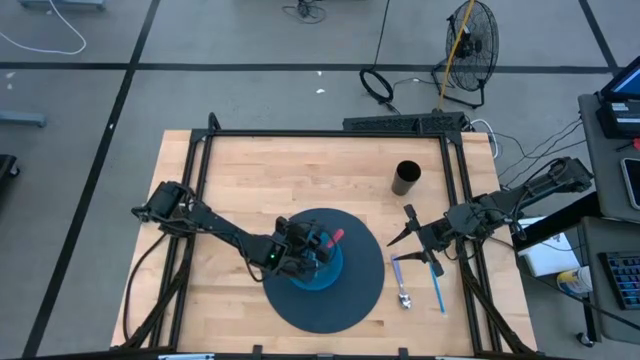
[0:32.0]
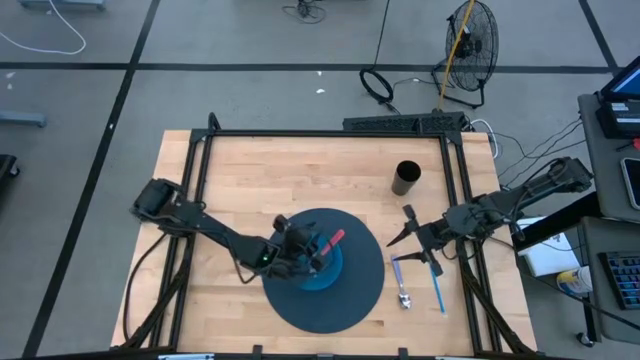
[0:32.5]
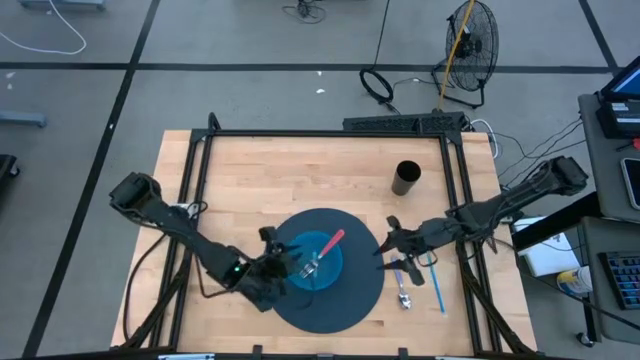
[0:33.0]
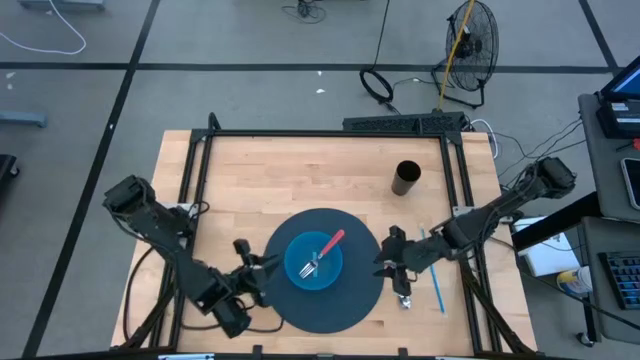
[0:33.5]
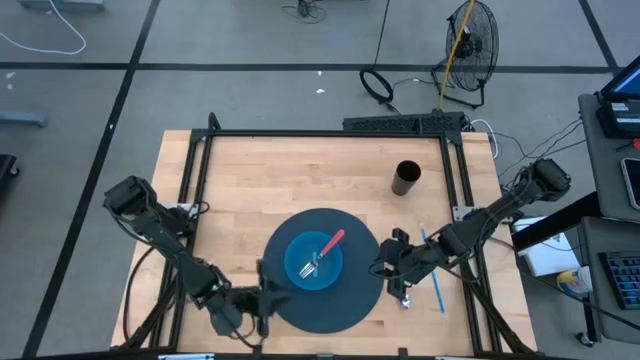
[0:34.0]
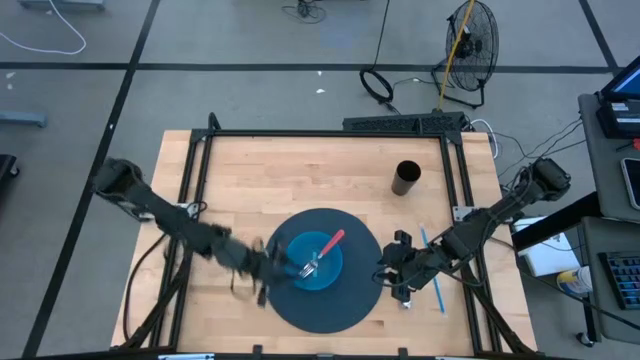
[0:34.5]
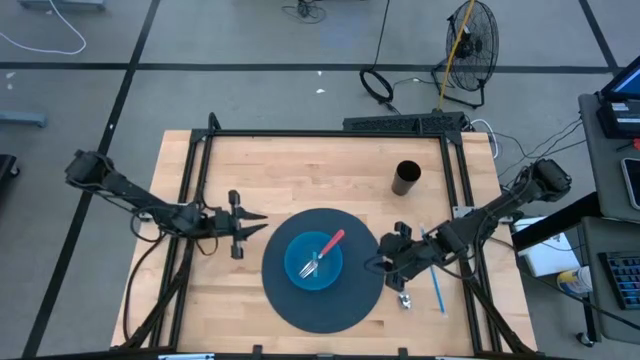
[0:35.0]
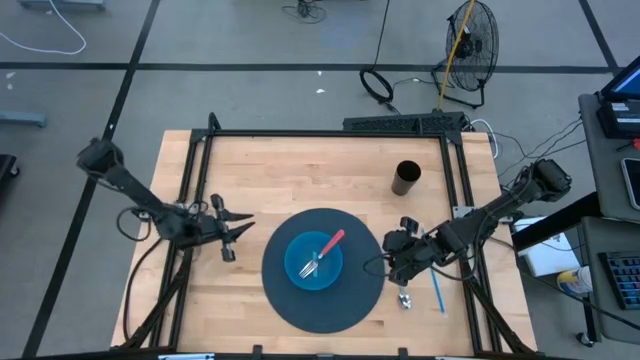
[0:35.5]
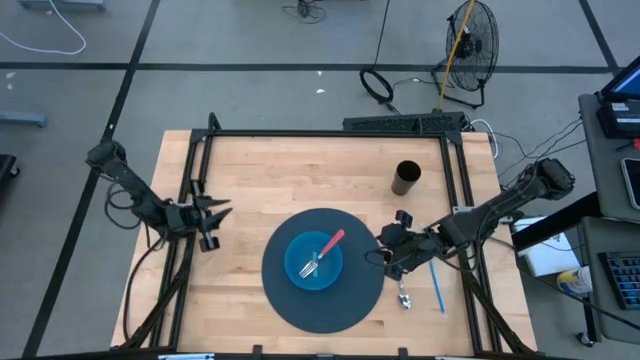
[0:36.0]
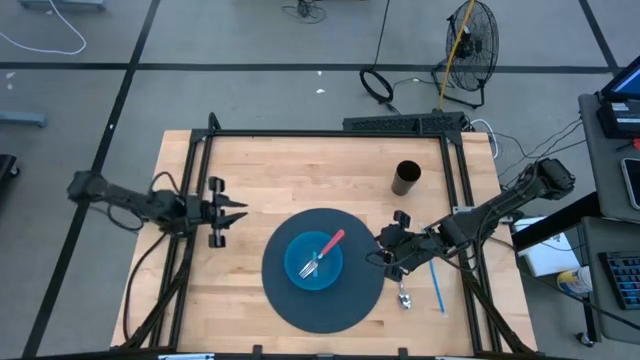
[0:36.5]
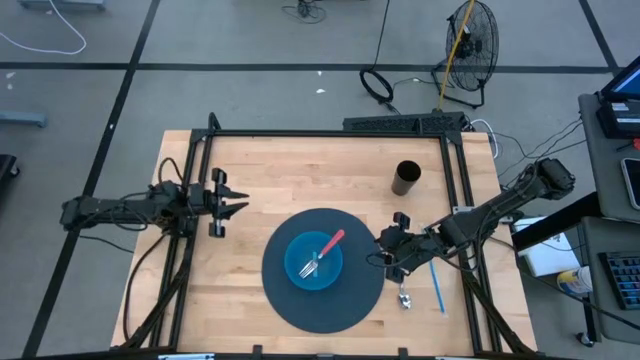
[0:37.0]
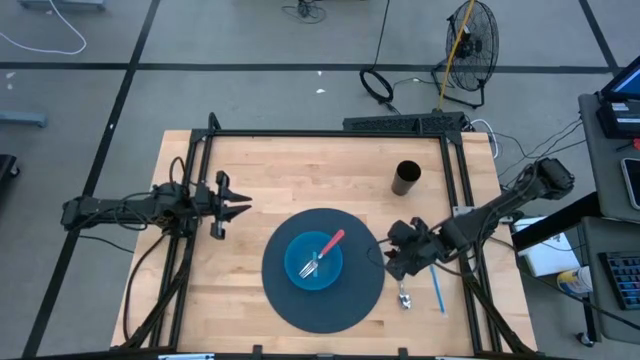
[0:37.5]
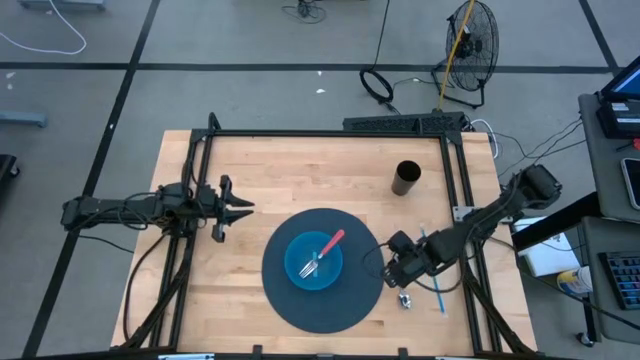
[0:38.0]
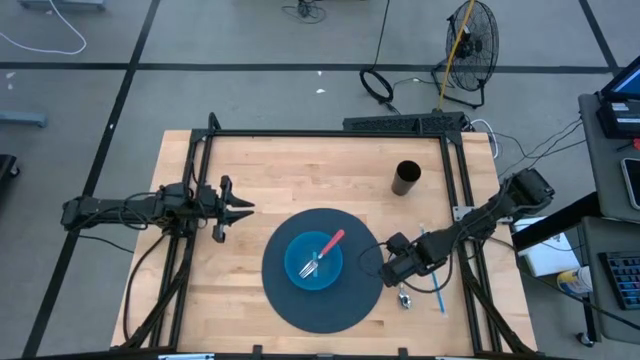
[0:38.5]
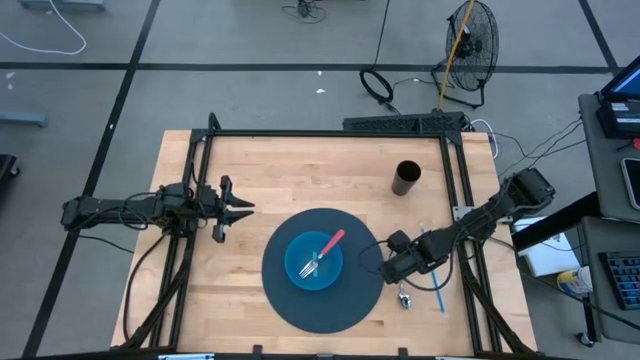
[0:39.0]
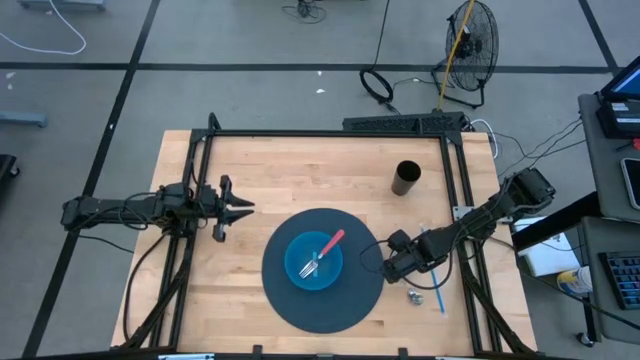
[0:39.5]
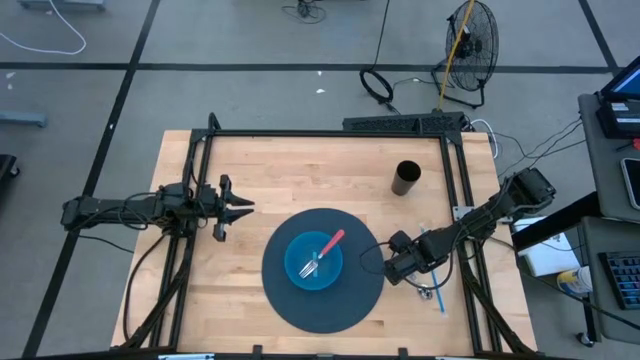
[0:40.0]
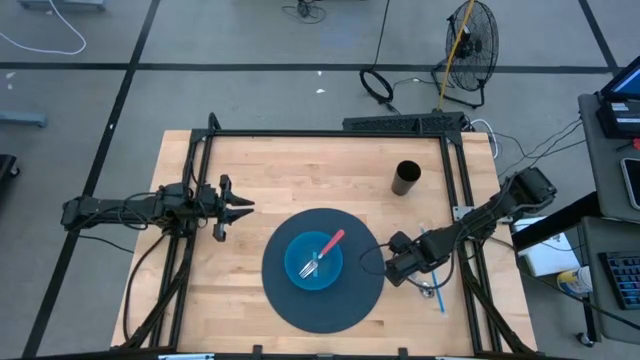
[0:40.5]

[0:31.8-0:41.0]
Task: Pick & Place Utensil
Put the purple spoon into the blue bowl on the blue mat

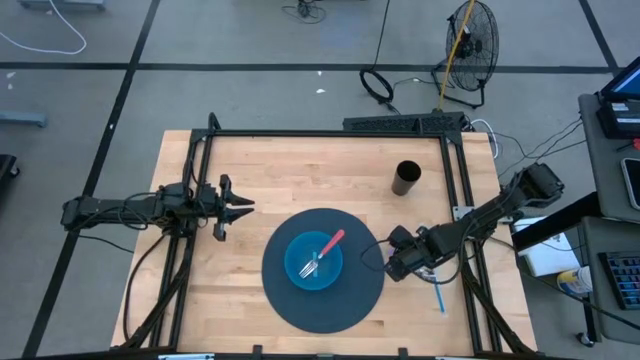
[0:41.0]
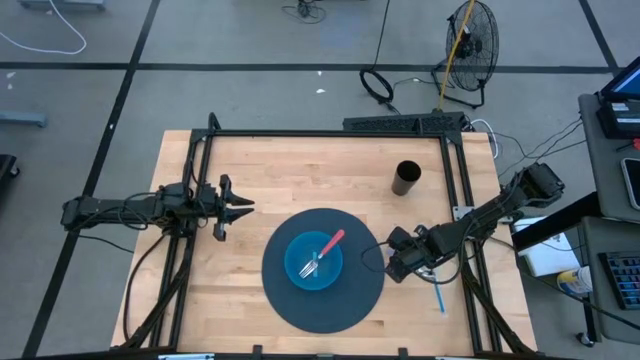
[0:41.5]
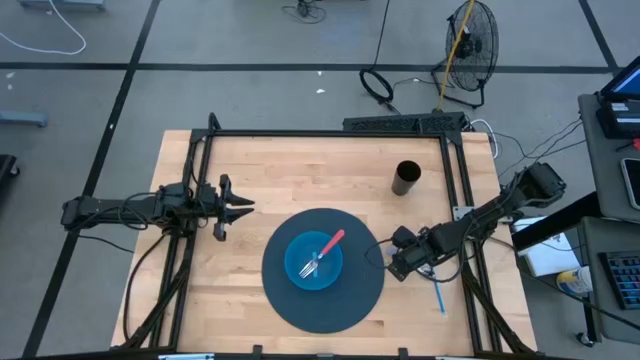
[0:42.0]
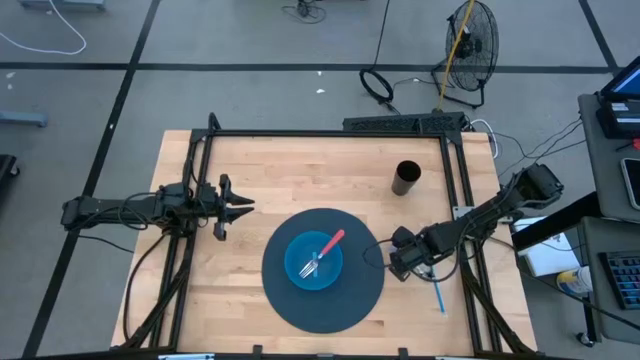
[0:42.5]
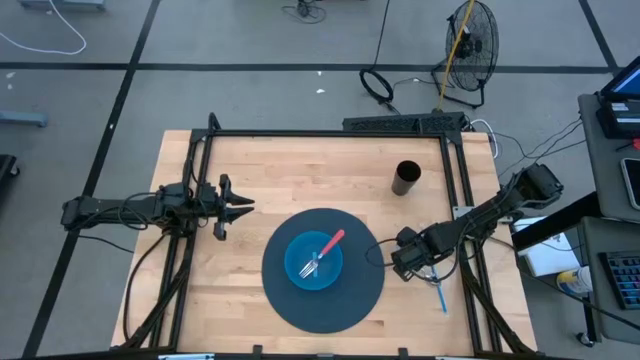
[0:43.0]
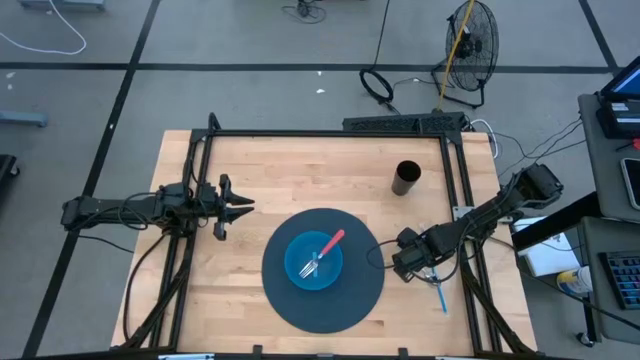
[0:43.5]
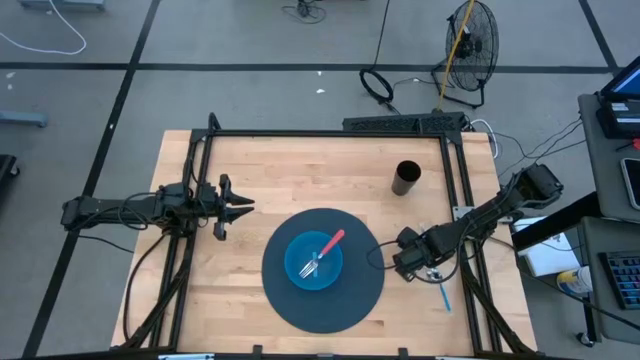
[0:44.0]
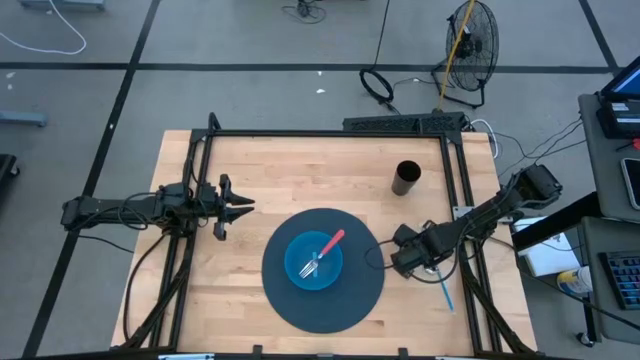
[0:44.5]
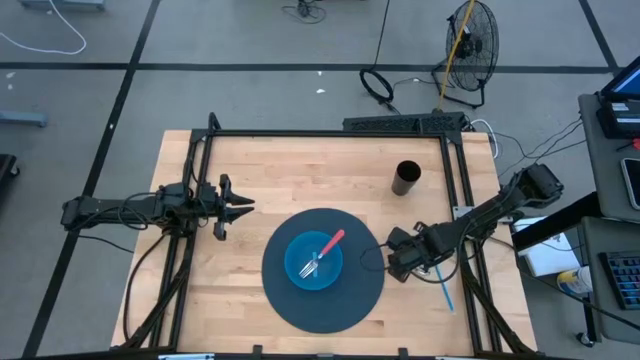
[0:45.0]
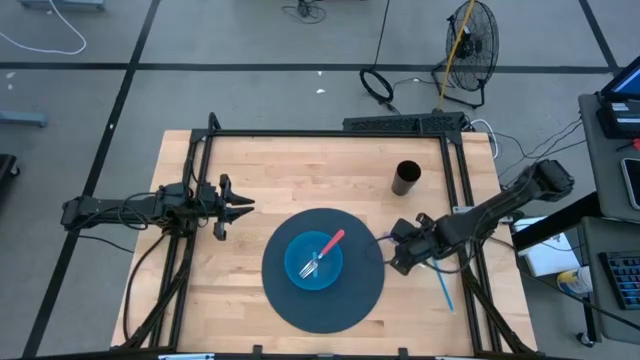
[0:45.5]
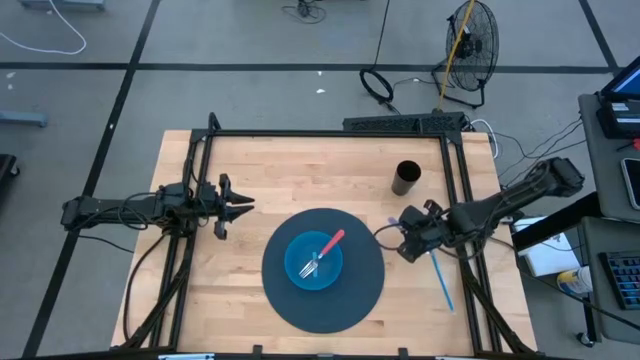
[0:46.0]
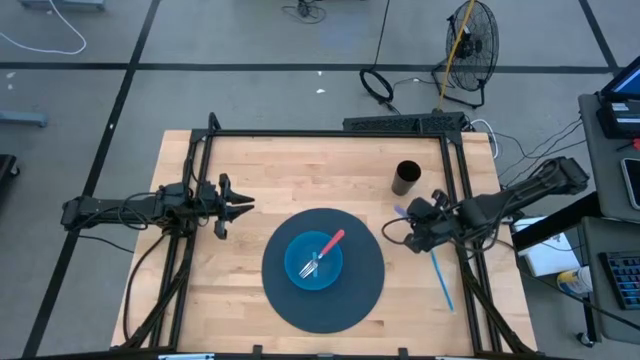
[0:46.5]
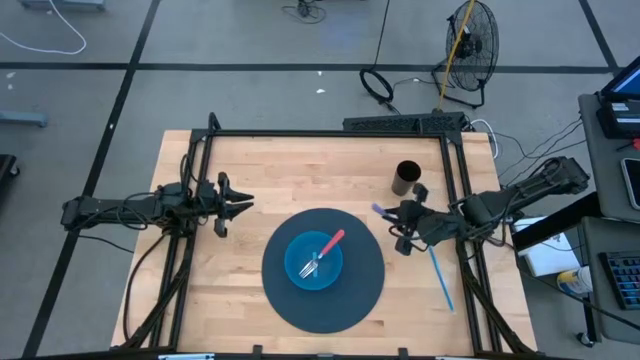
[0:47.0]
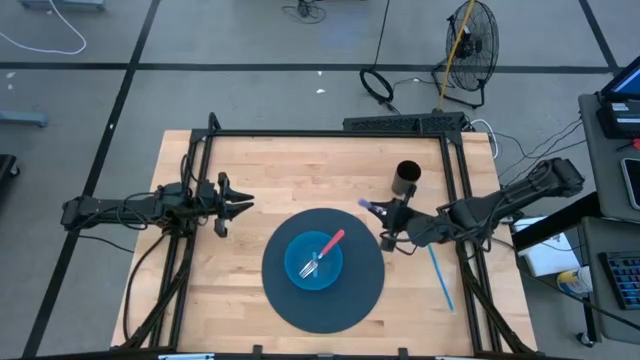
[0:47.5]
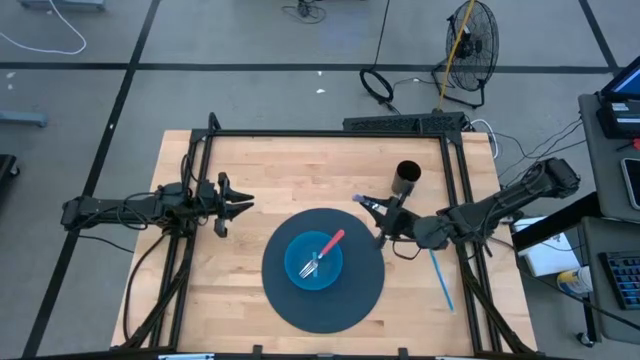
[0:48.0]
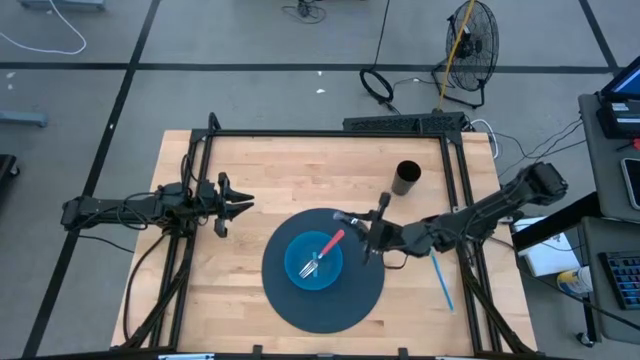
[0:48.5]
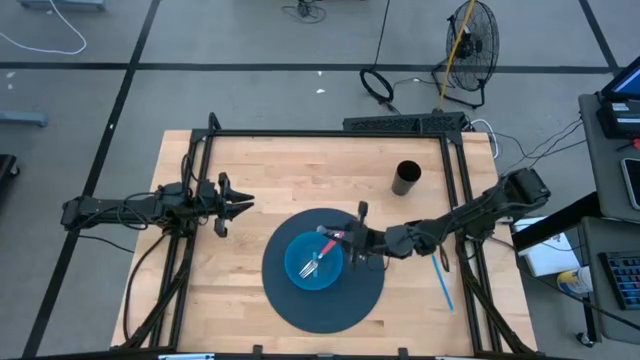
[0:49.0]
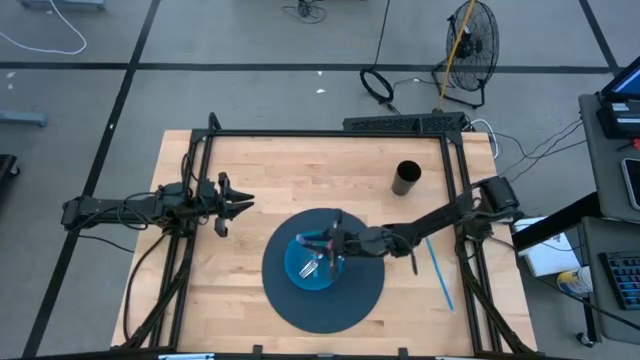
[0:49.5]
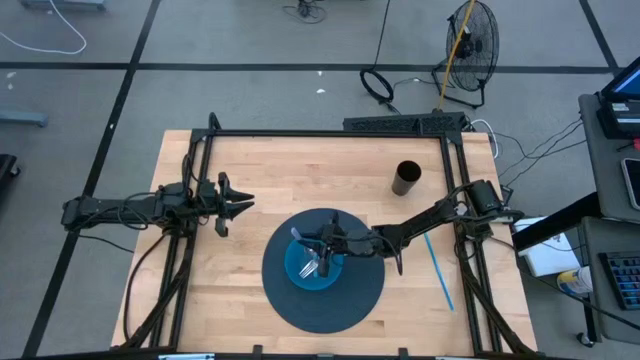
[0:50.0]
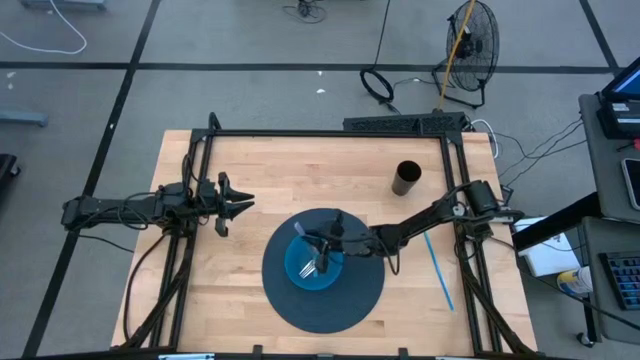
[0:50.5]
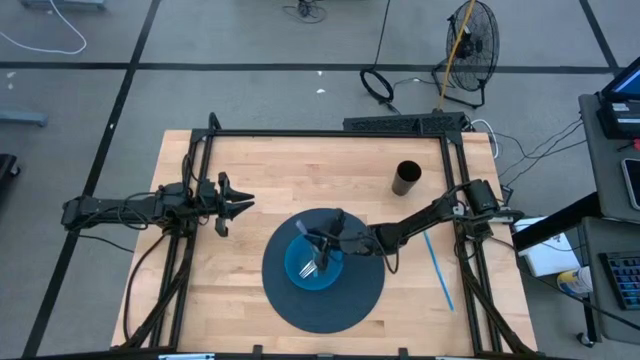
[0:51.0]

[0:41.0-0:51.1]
Put the purple spoon into the blue bowl on the blue mat

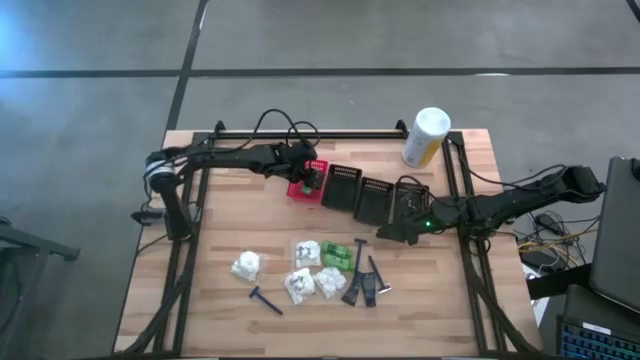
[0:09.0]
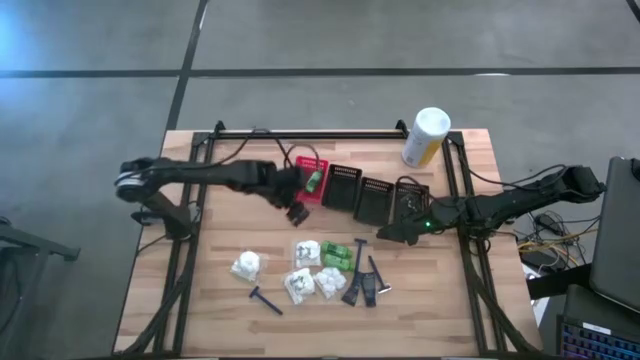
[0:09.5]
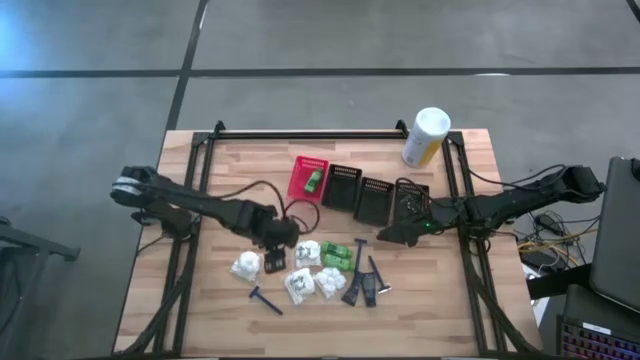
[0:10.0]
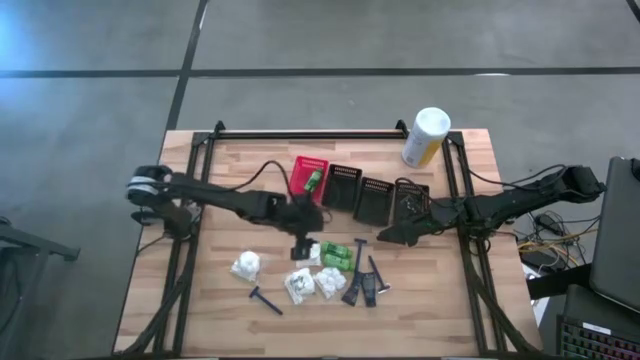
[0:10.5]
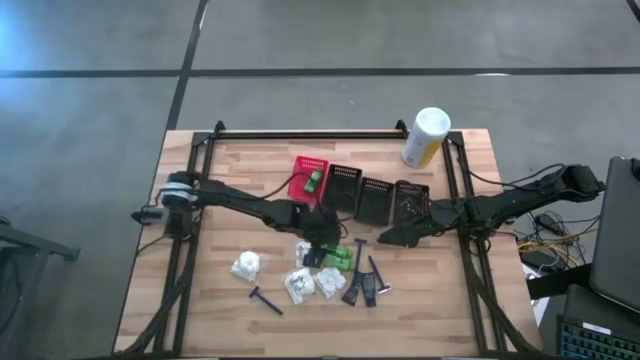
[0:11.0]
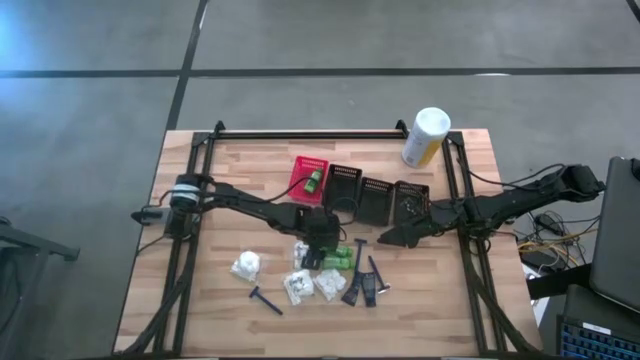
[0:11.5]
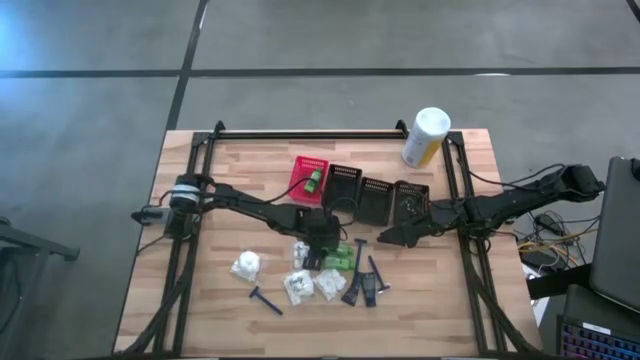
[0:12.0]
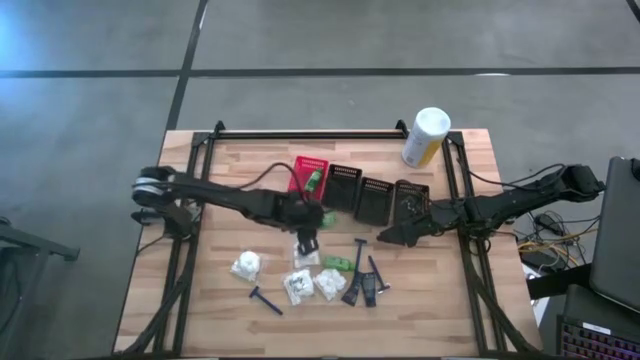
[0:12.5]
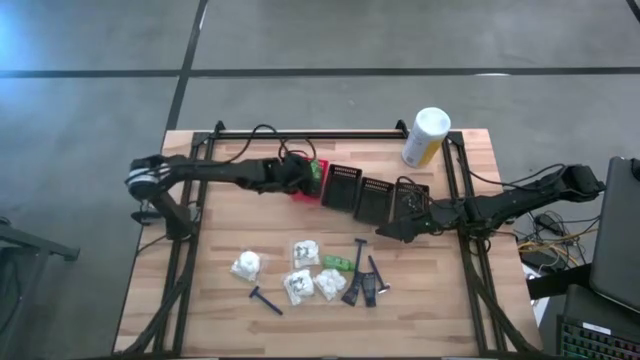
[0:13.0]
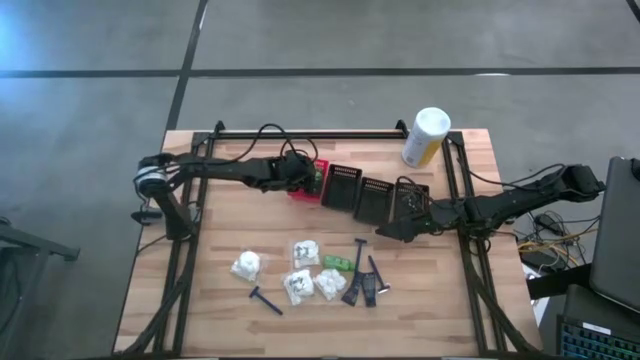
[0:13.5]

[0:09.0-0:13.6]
Task: Pick & Place Travel size toiletries
Put the shampoo into the red bin
